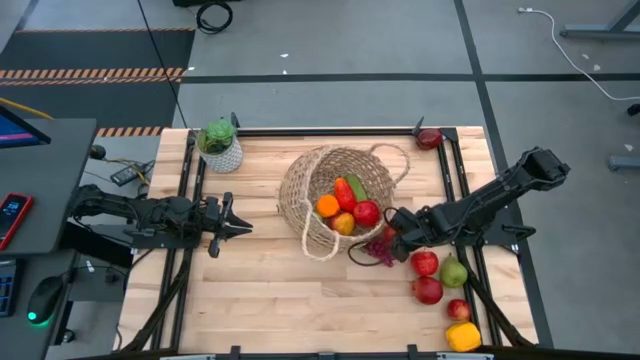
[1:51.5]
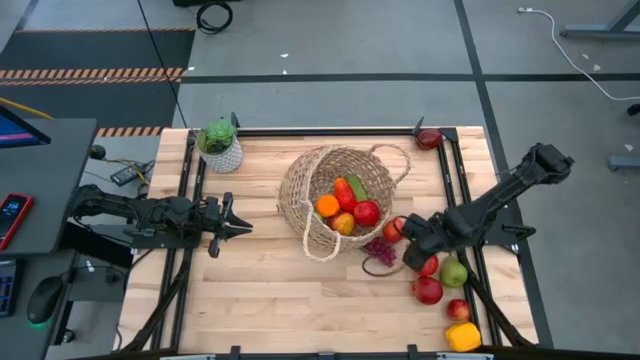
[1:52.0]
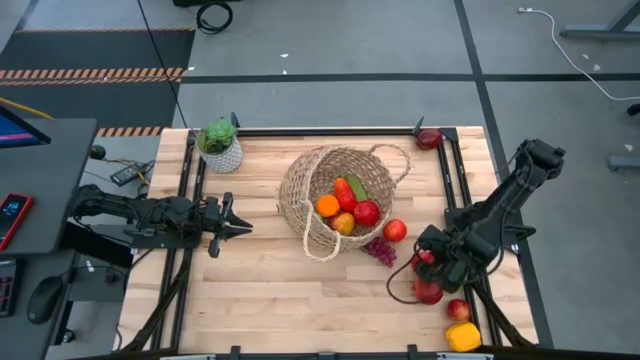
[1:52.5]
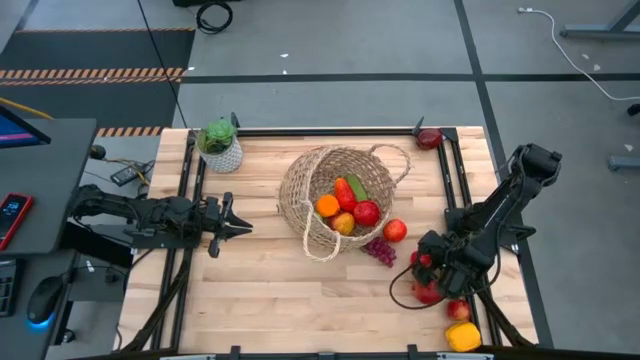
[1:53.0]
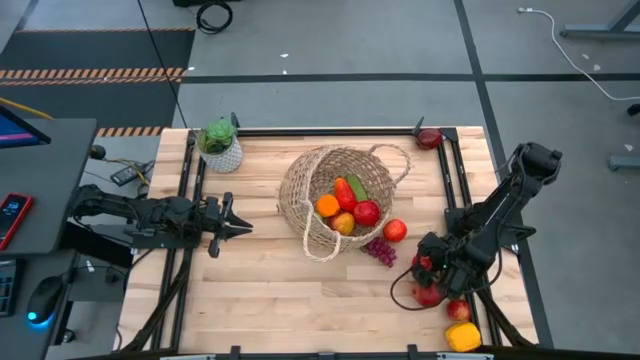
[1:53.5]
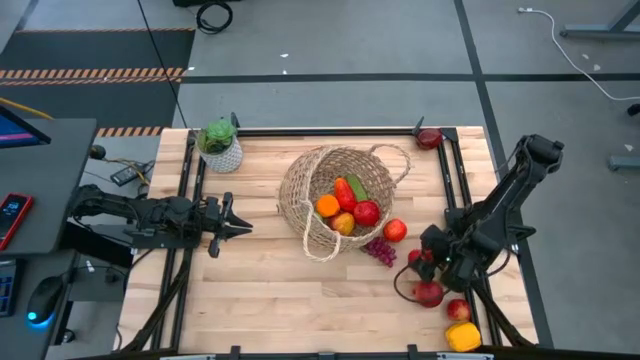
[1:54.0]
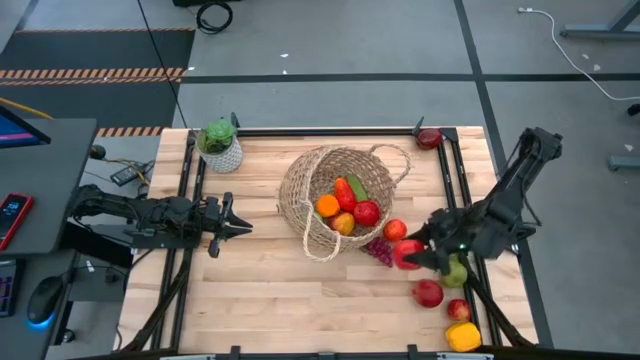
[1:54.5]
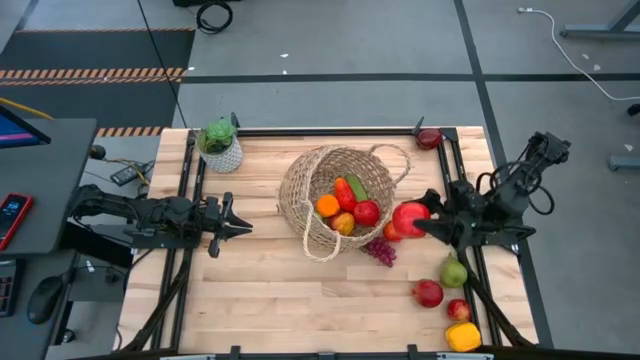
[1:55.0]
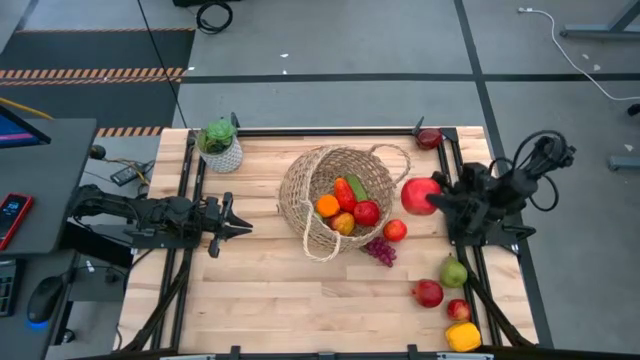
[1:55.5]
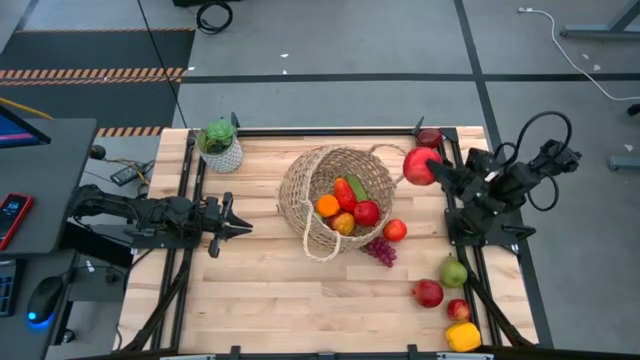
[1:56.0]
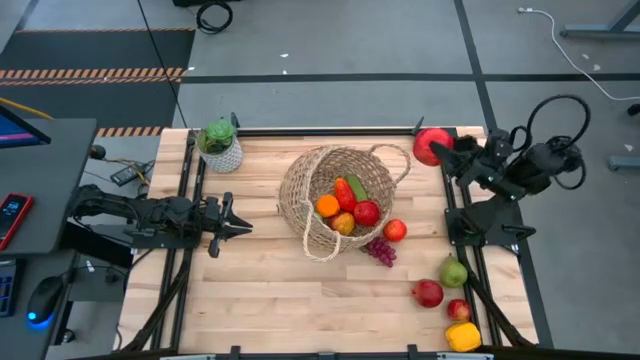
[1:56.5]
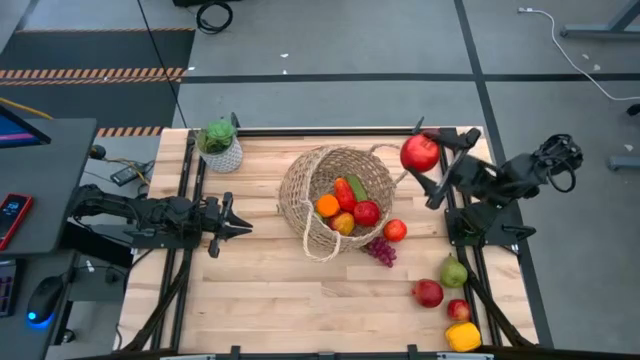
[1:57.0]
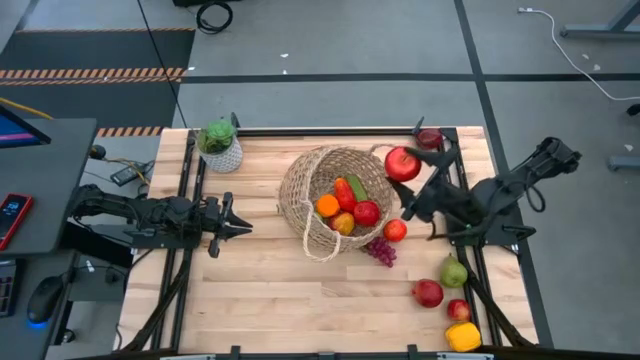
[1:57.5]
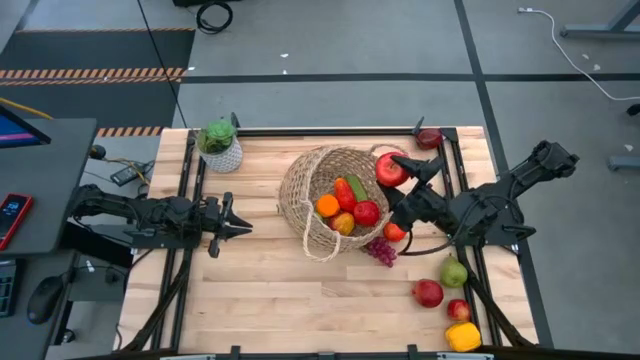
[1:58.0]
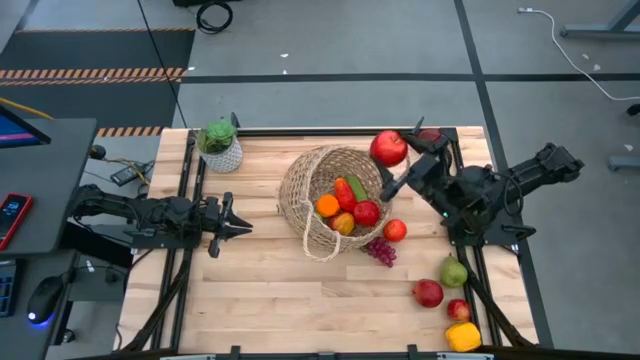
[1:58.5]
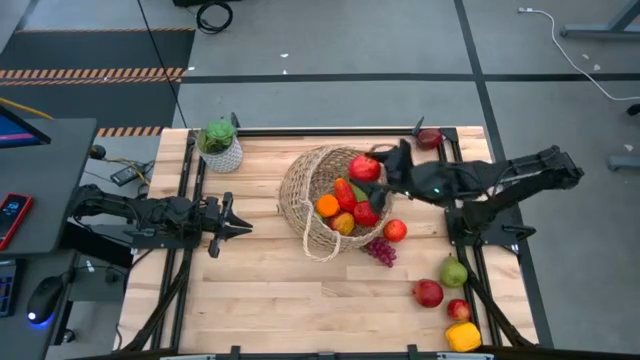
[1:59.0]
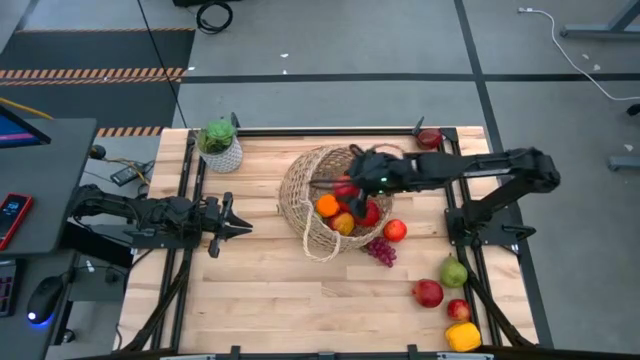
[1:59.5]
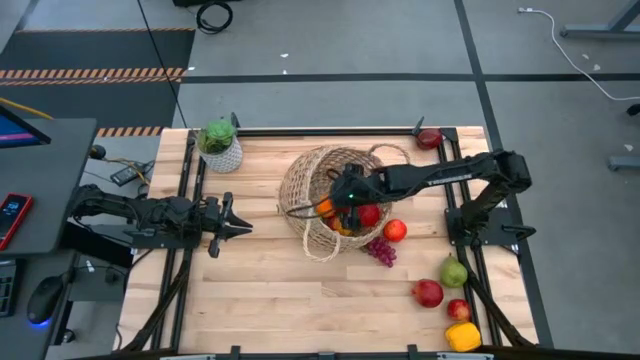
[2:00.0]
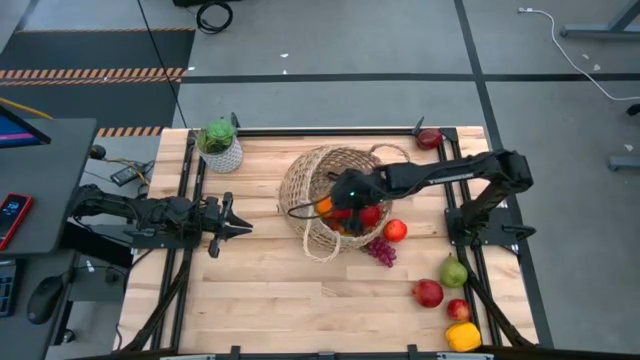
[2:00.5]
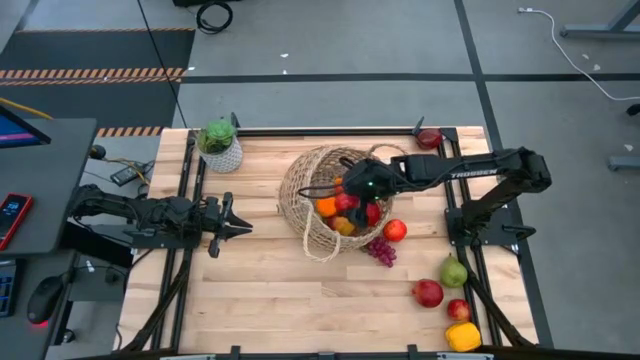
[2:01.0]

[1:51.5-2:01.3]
Task: Build produce basket
Put the red apple into the woven basket

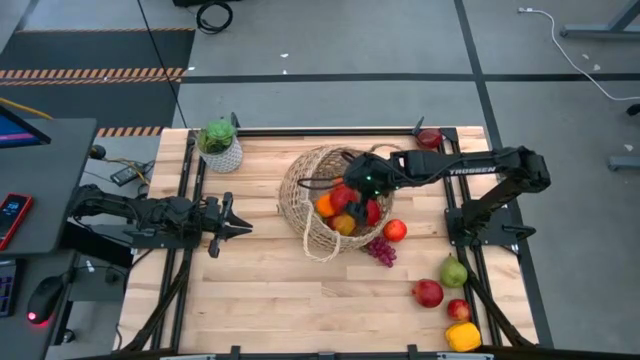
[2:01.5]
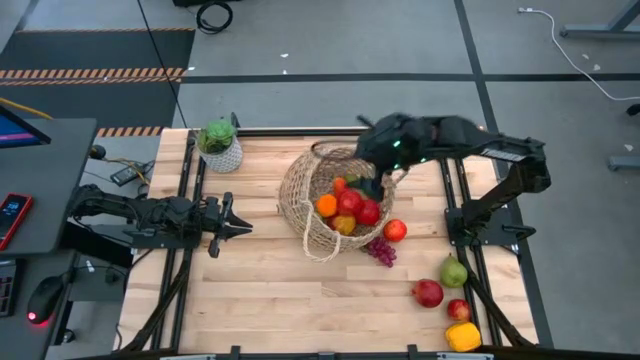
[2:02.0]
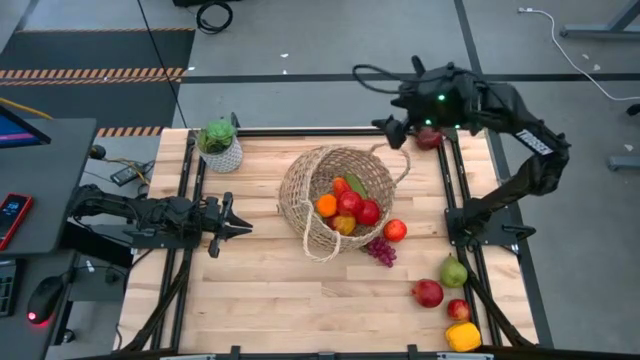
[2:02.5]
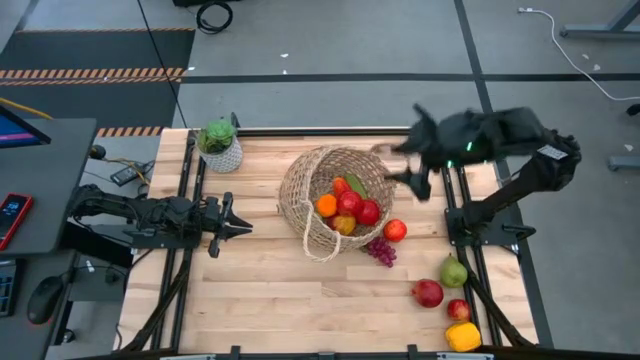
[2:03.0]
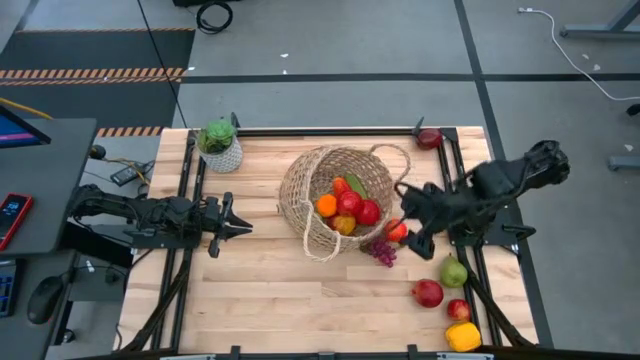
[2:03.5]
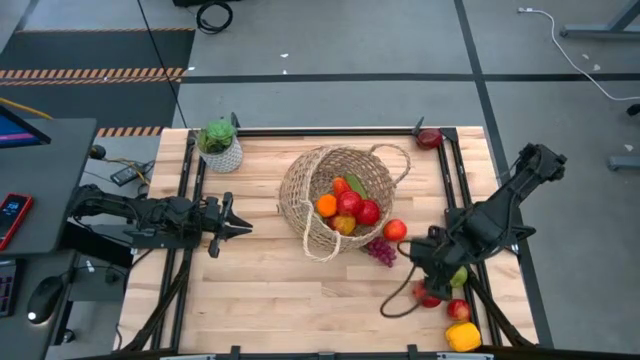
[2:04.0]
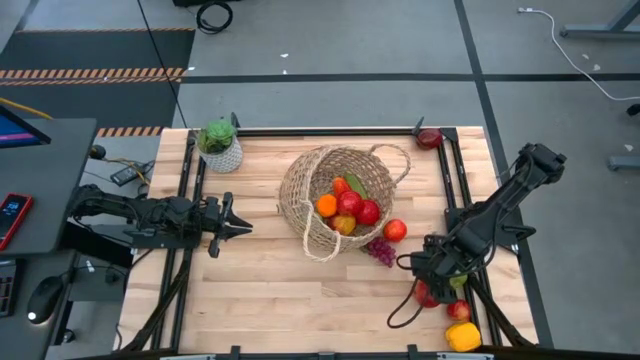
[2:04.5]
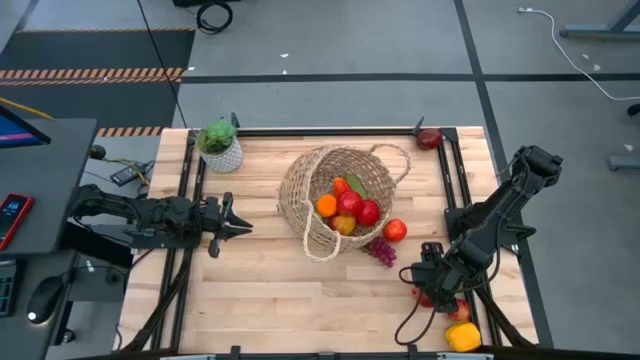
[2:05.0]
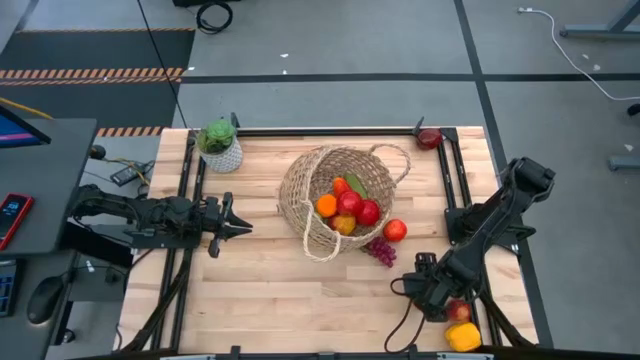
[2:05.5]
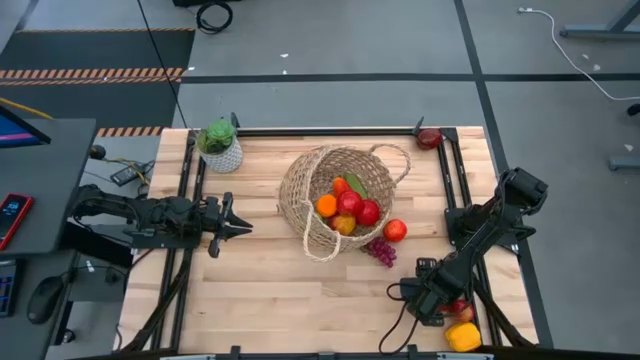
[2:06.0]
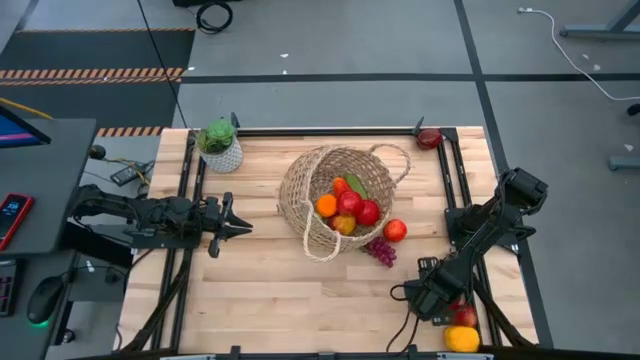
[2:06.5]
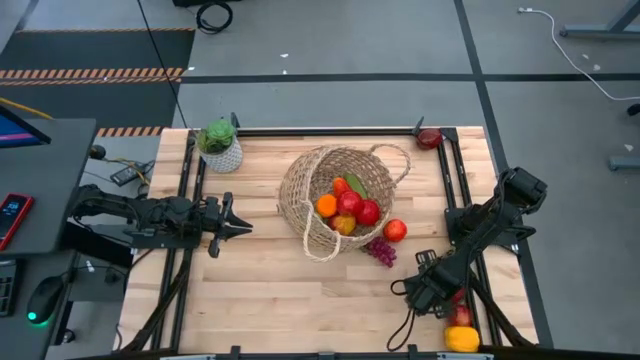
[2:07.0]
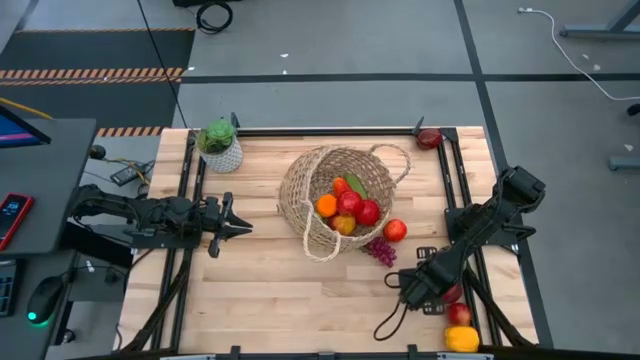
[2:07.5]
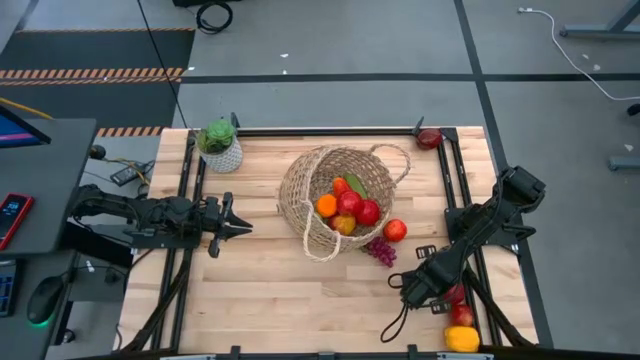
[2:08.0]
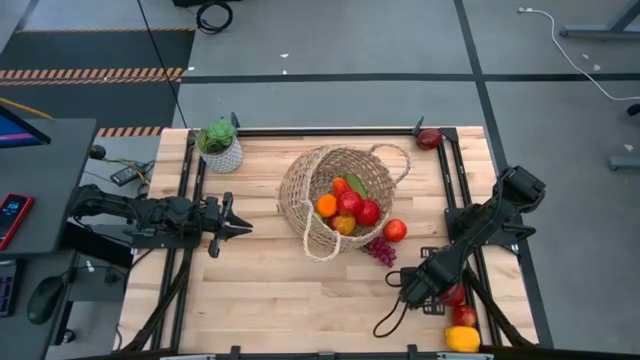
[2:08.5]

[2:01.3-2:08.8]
Put the red pomegranate into the woven basket

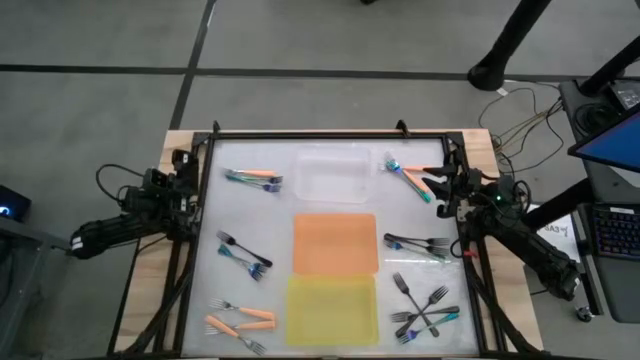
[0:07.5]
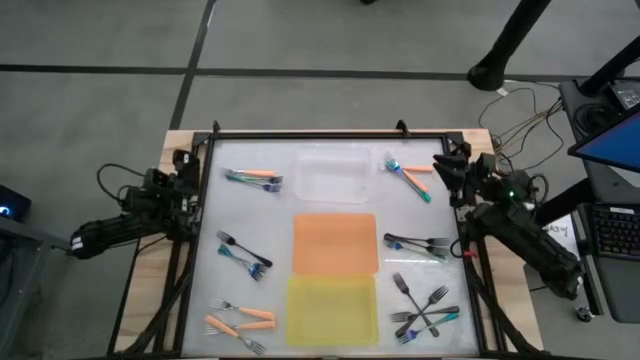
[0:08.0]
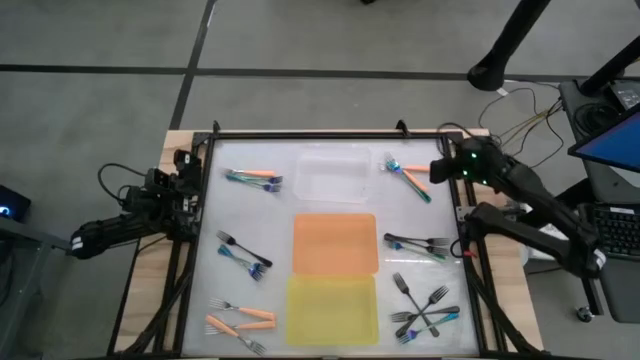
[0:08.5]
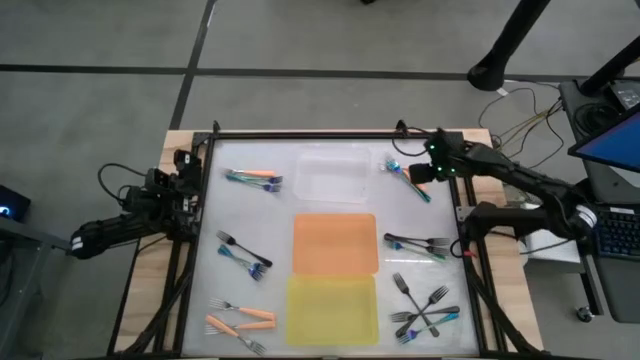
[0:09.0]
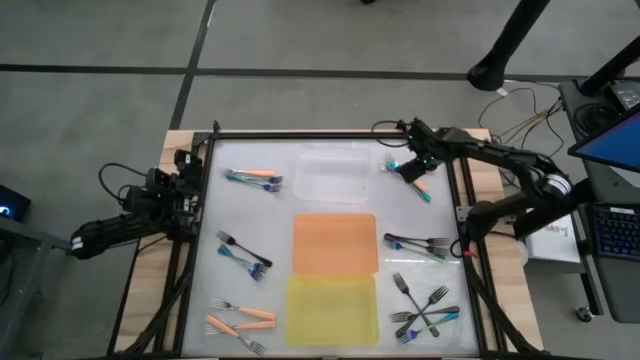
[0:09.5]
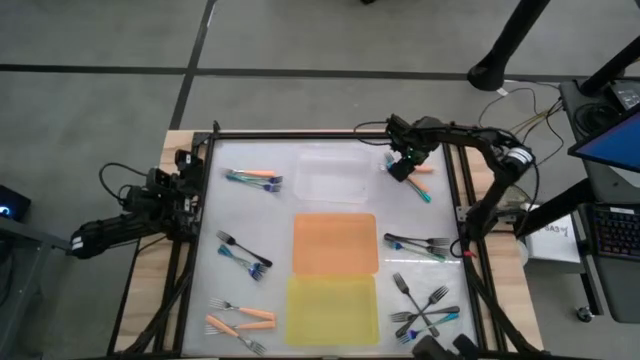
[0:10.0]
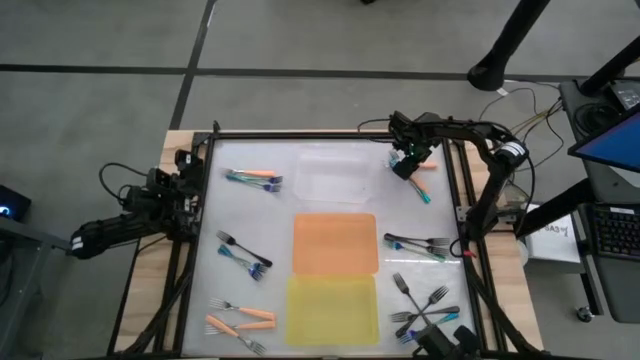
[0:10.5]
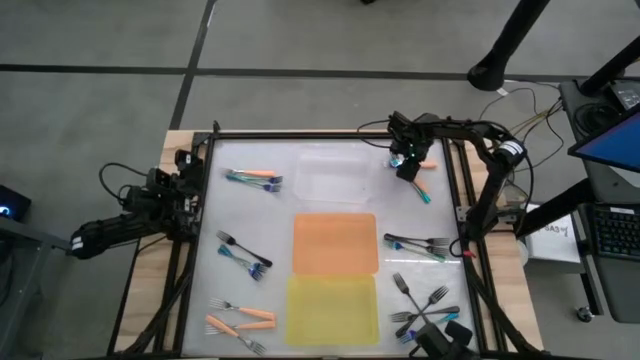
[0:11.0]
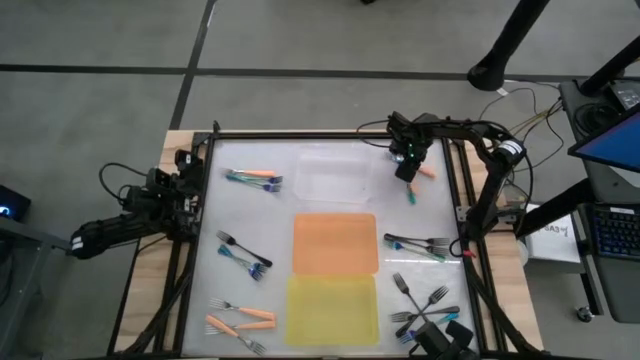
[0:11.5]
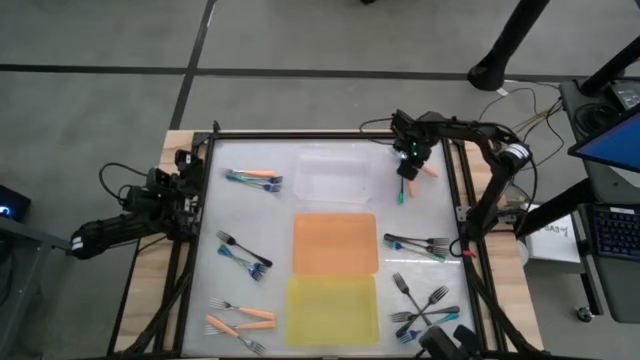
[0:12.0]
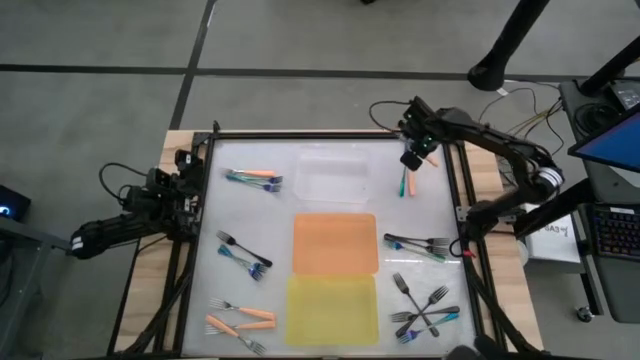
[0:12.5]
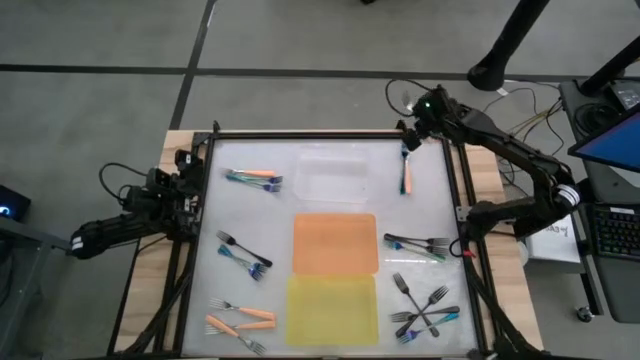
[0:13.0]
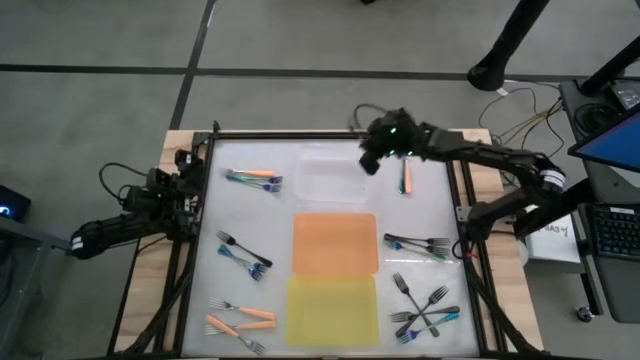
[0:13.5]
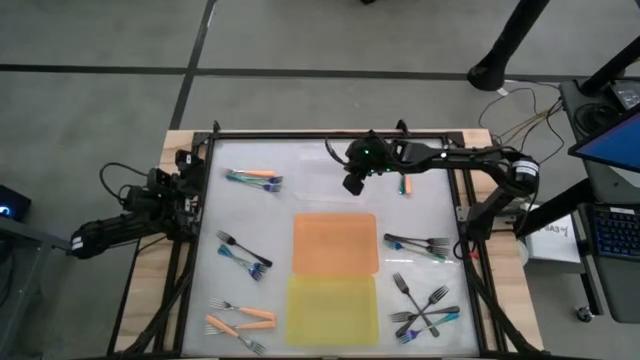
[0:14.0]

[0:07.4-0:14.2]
Task: Sort silverware by color (type)
Put the orange fork into the white bin
